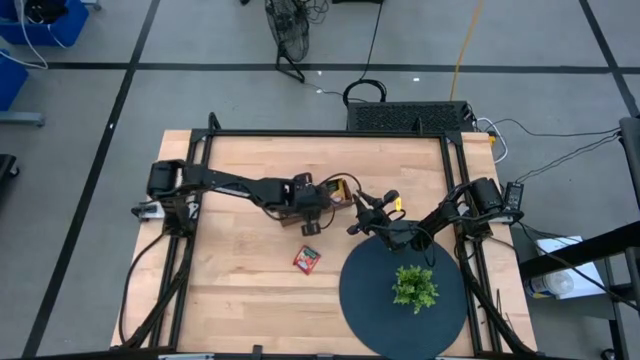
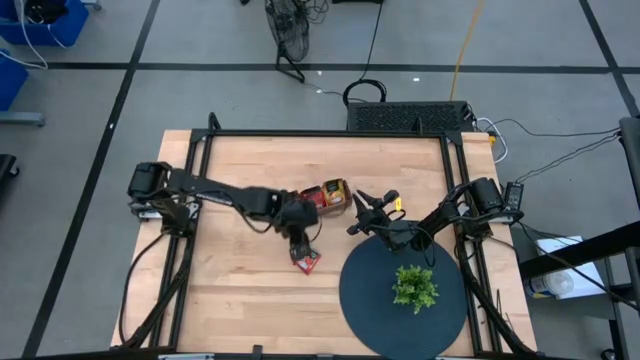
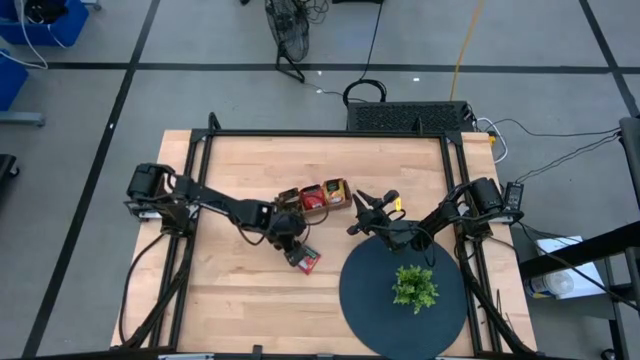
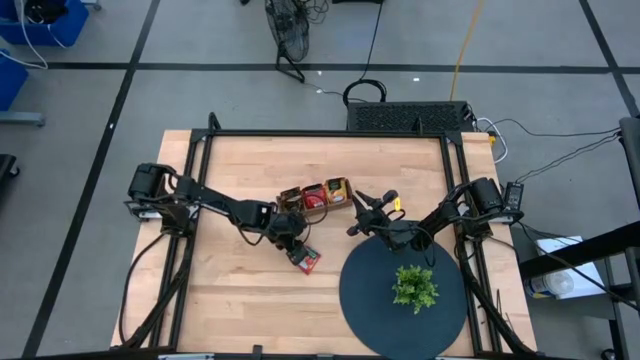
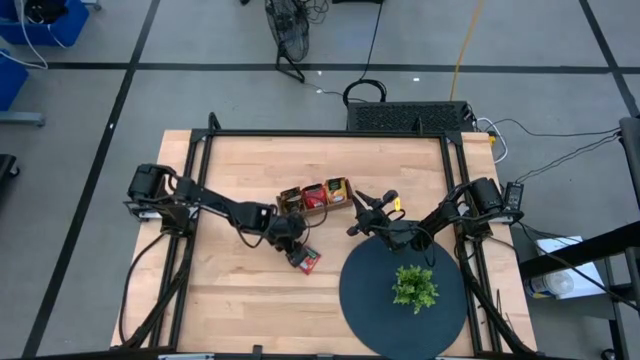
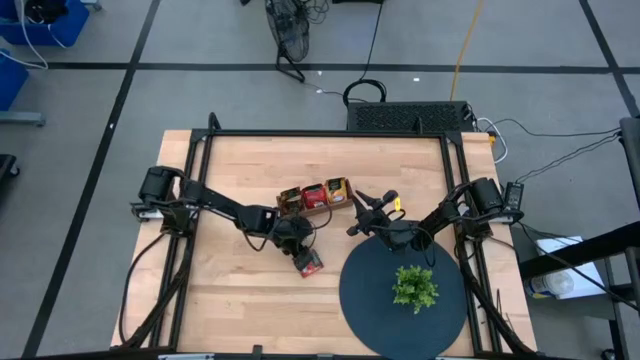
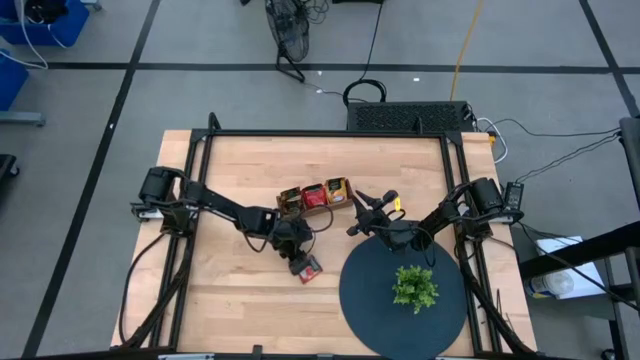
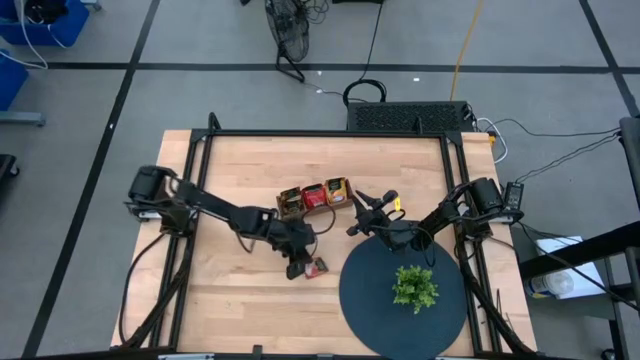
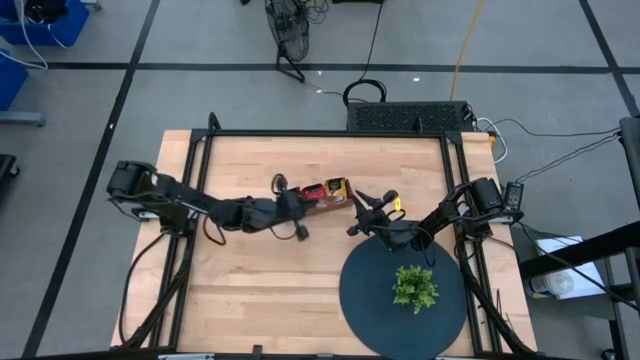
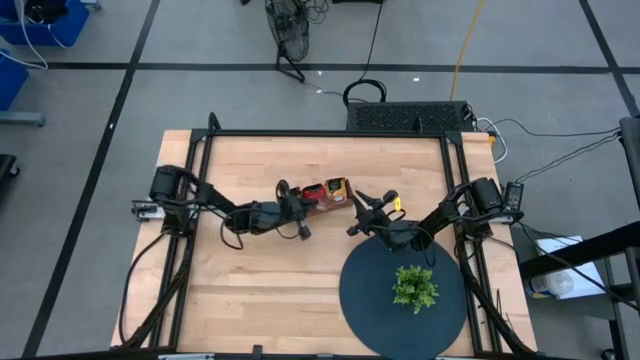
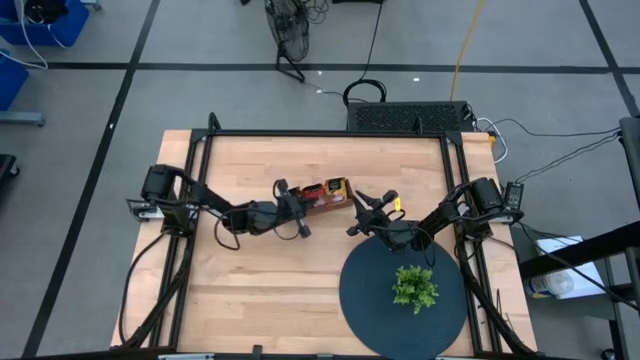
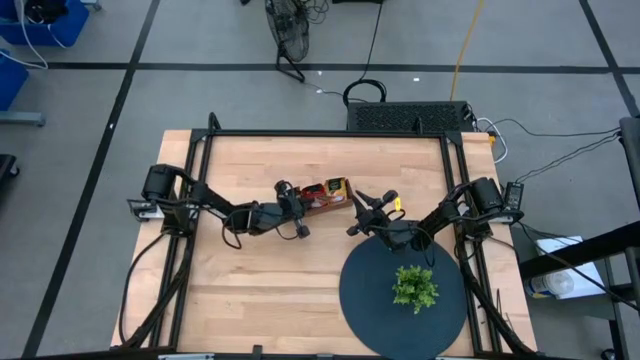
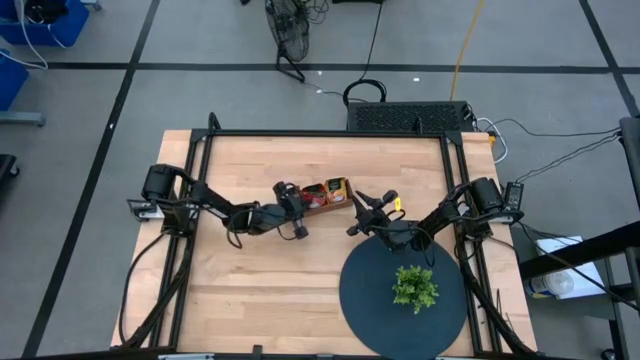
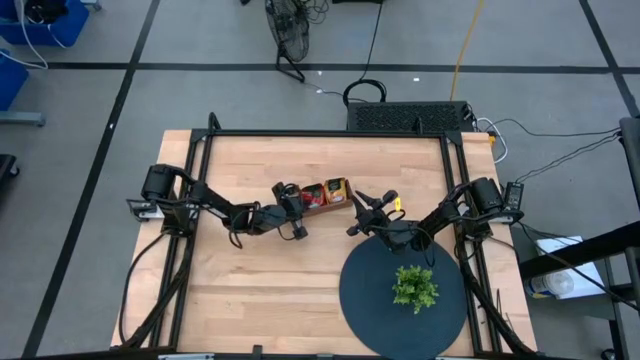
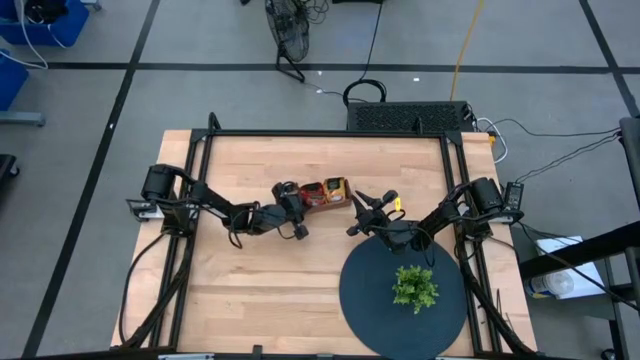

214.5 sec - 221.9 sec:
Task: Pick & Place Tea
Put the red tea bag into the middle section wooden organizer

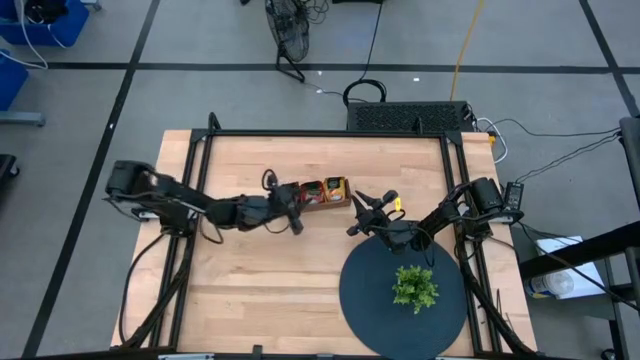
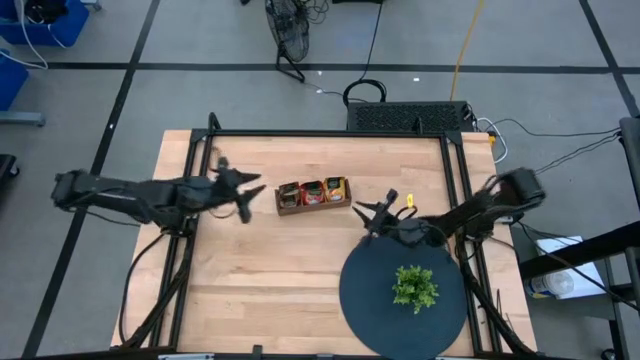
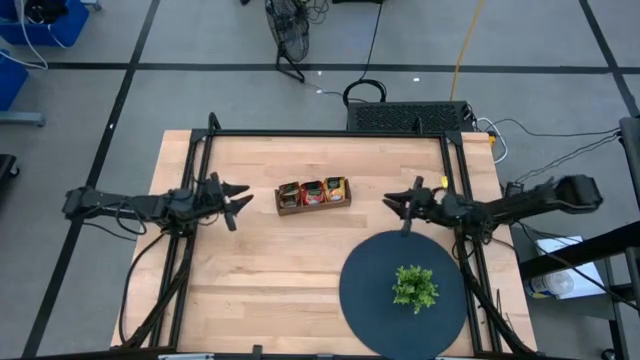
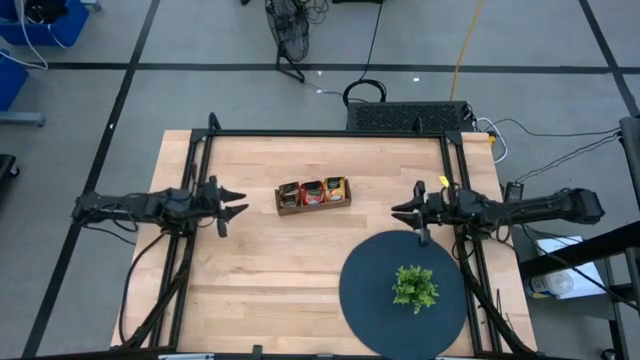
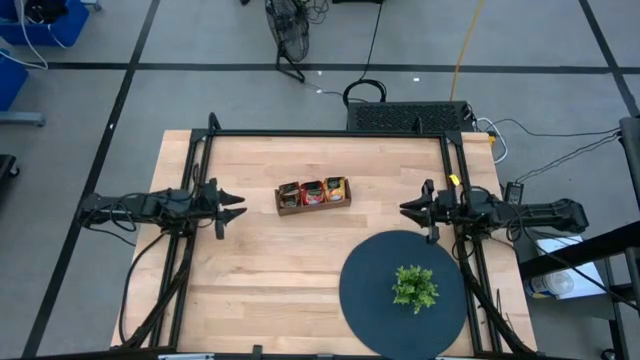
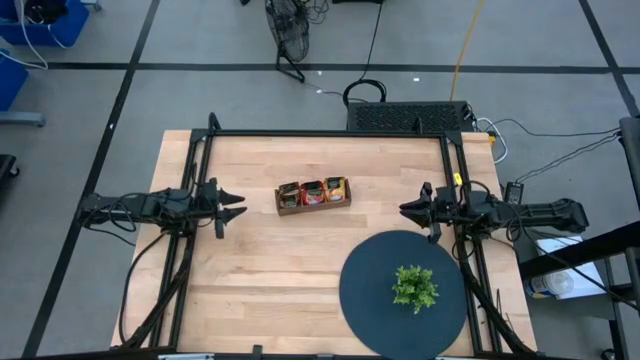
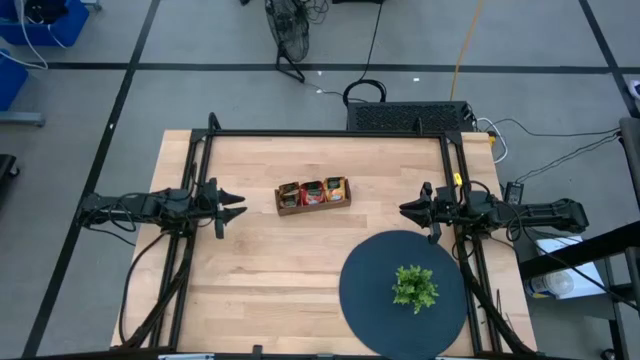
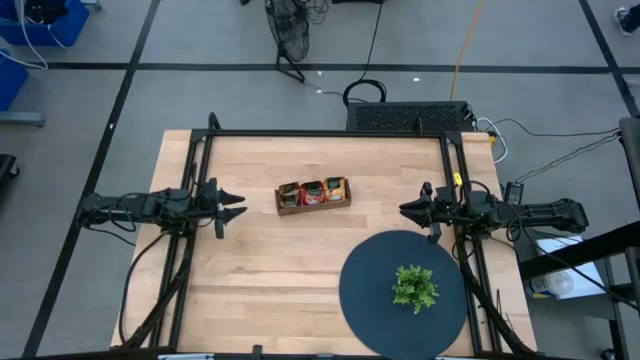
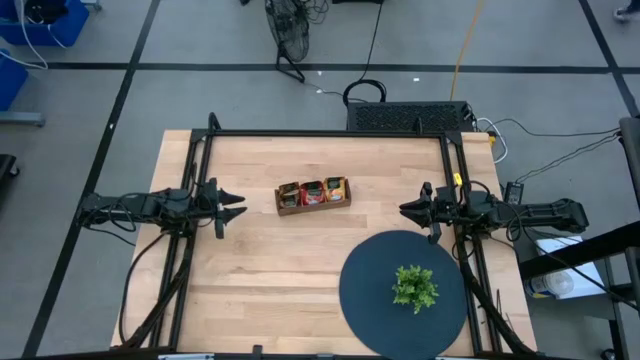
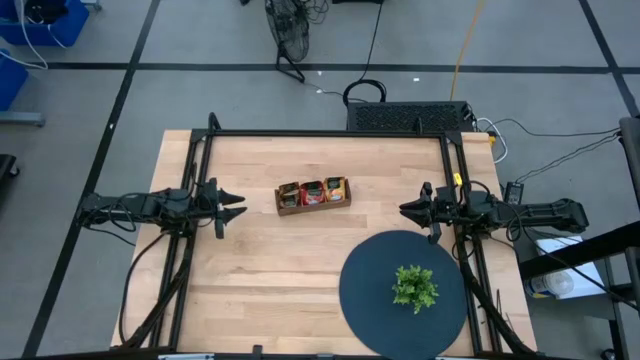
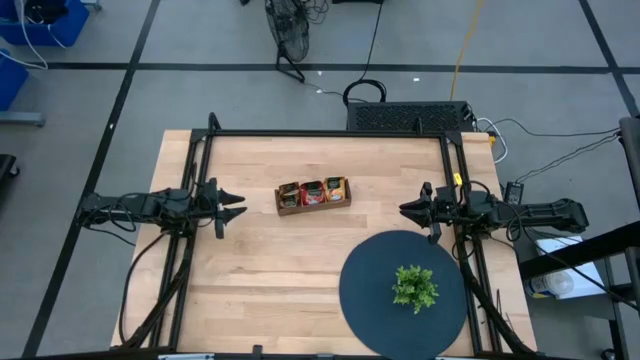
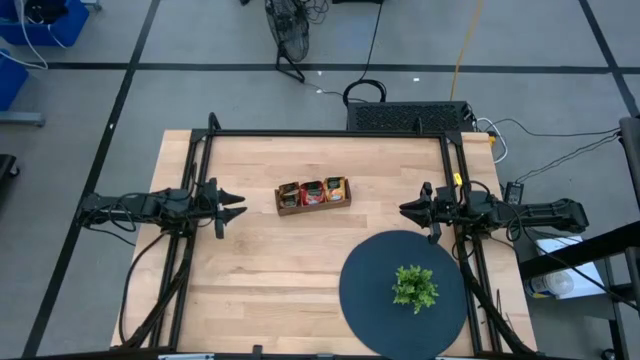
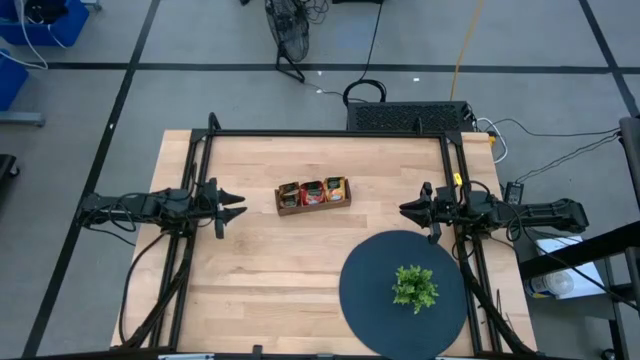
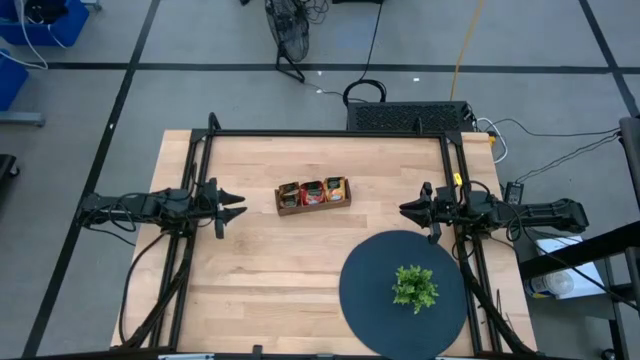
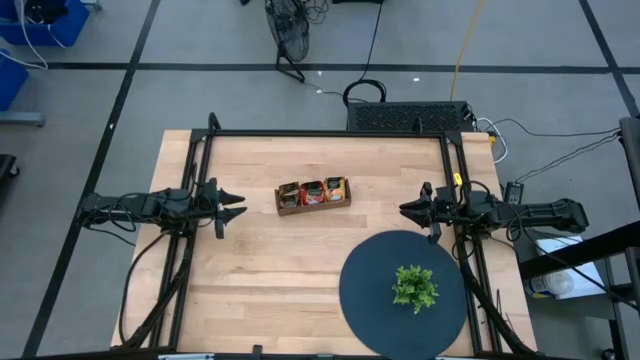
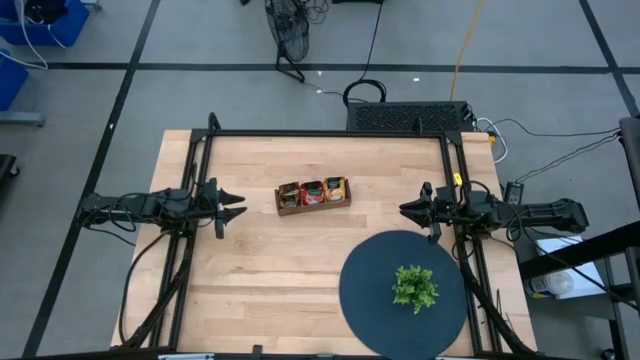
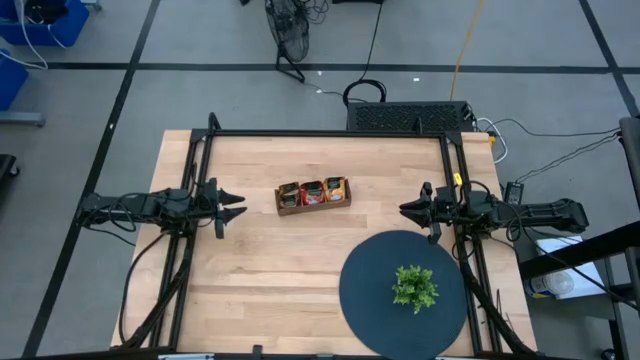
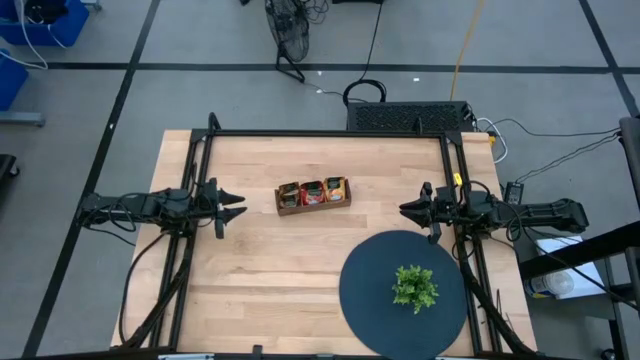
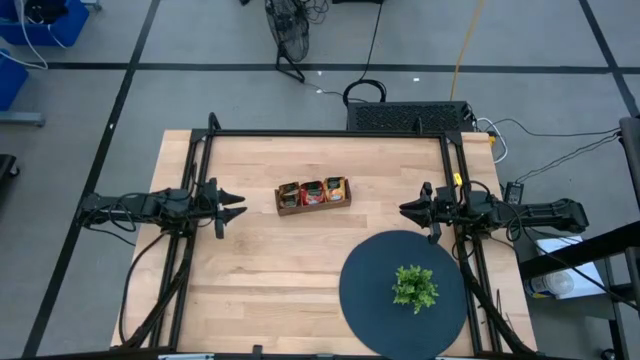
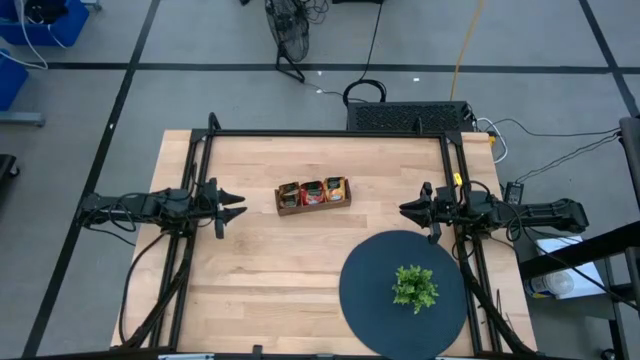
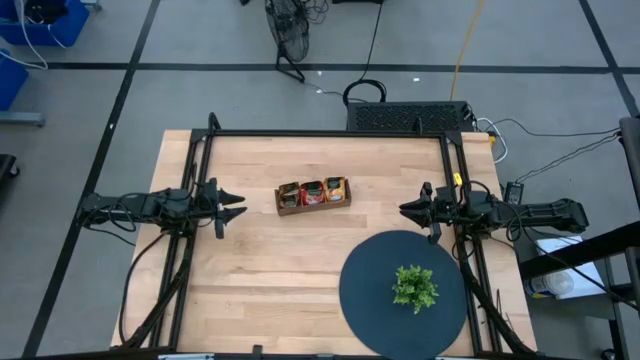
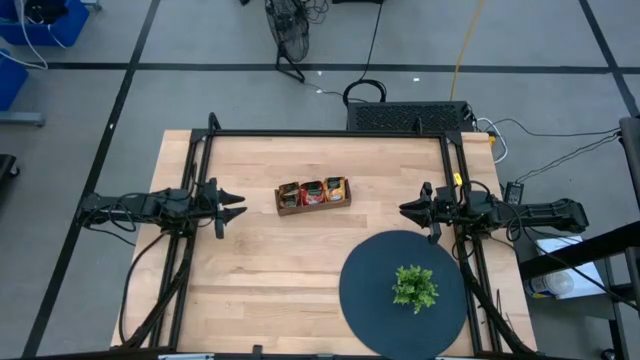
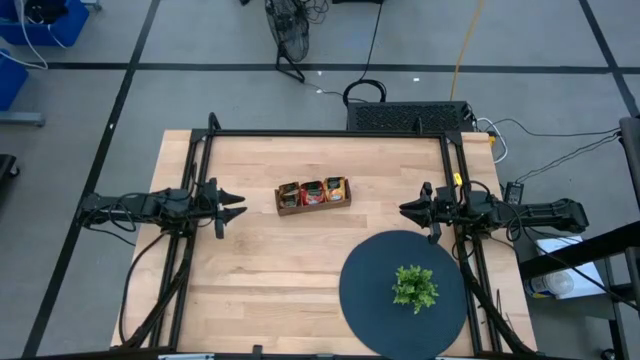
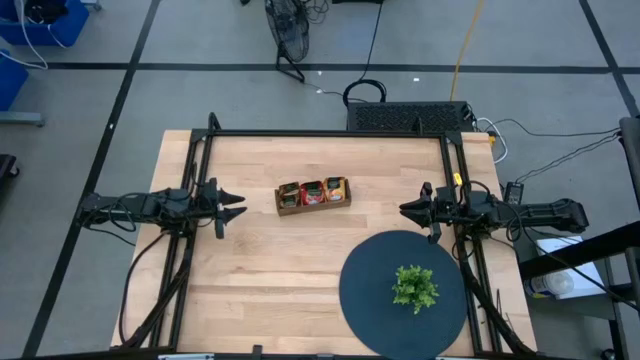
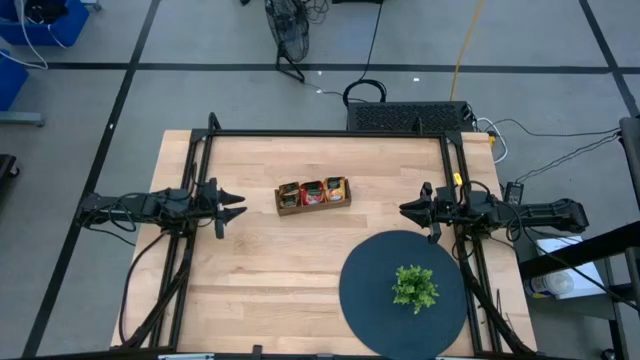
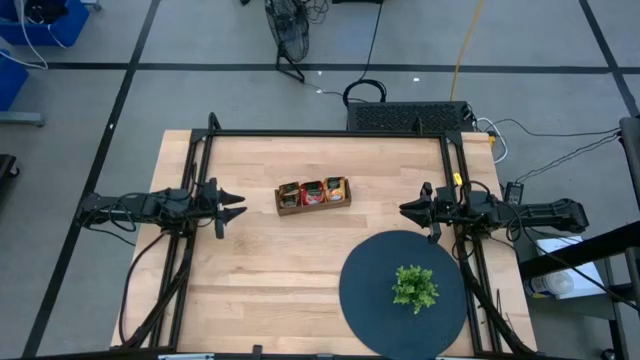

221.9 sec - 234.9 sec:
Return to Home Position
